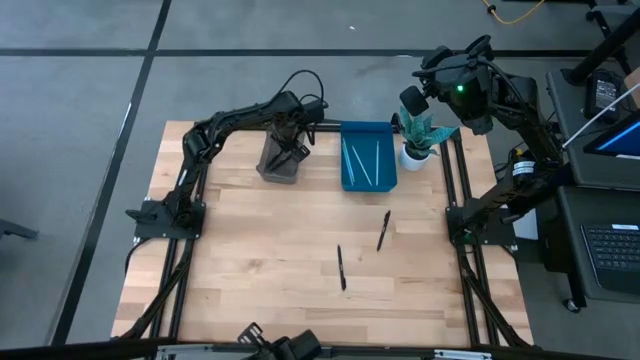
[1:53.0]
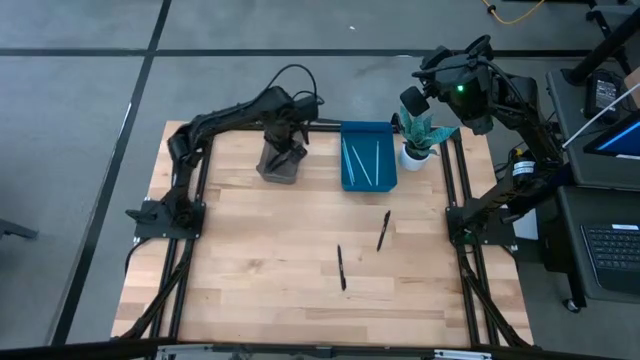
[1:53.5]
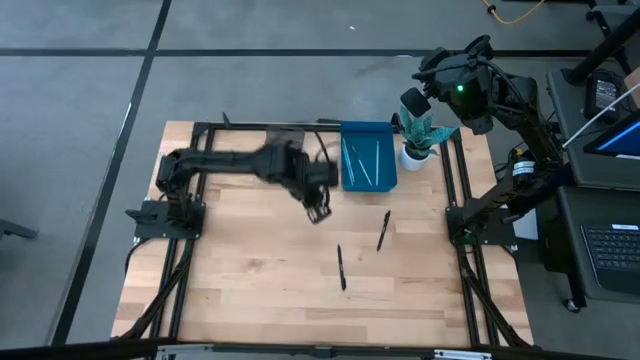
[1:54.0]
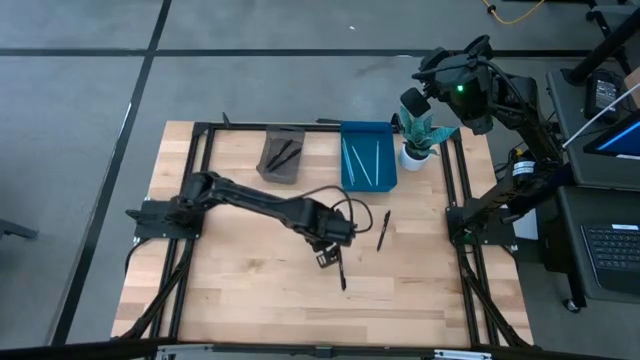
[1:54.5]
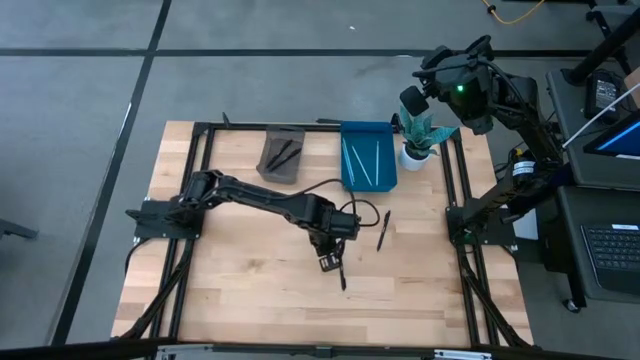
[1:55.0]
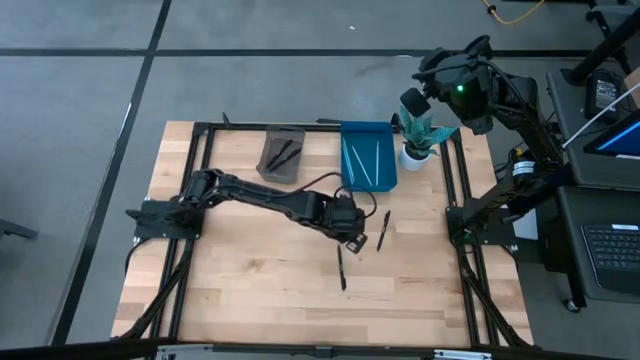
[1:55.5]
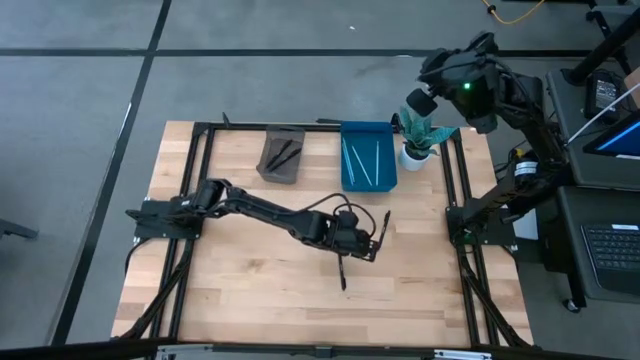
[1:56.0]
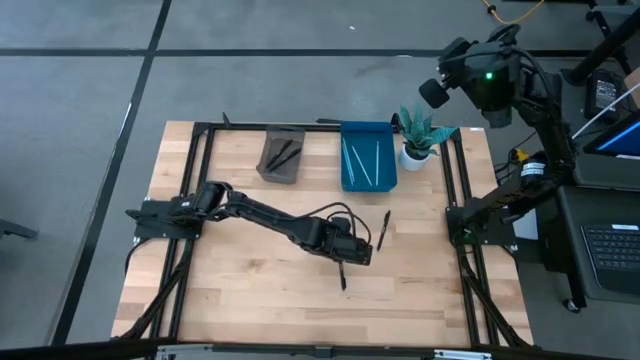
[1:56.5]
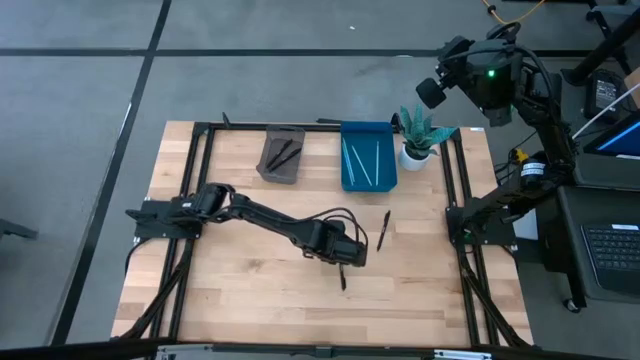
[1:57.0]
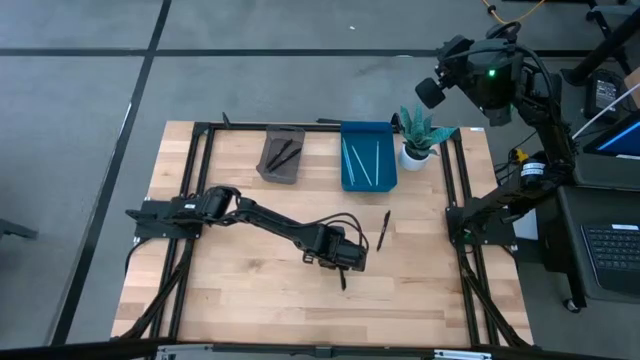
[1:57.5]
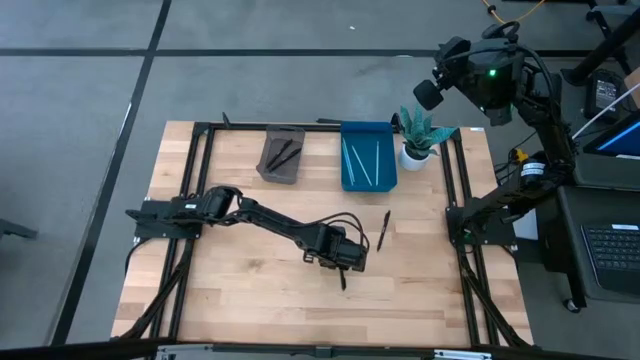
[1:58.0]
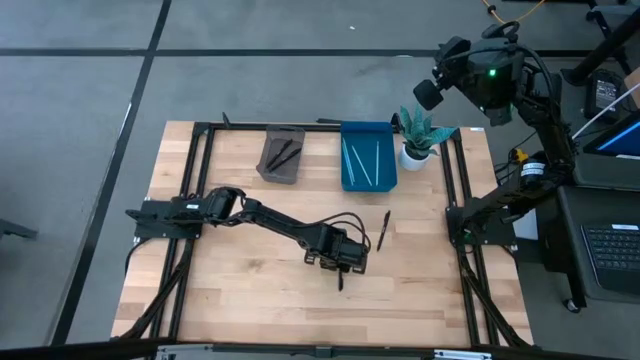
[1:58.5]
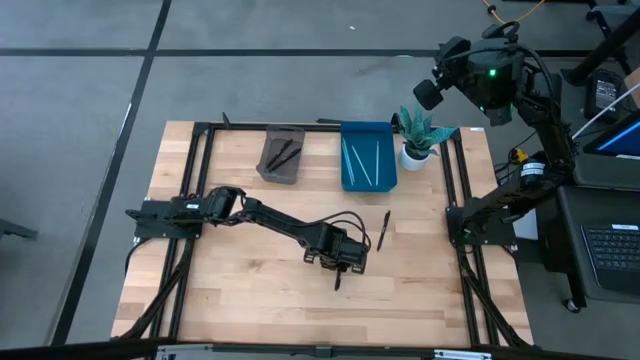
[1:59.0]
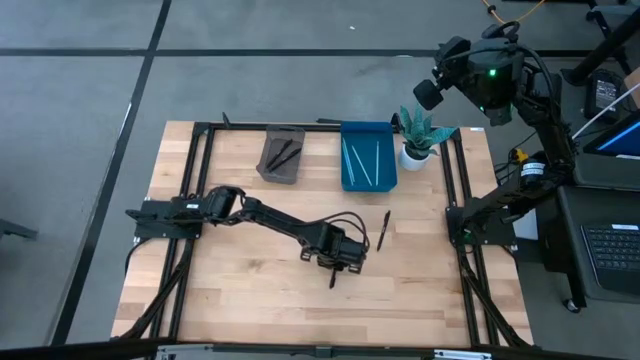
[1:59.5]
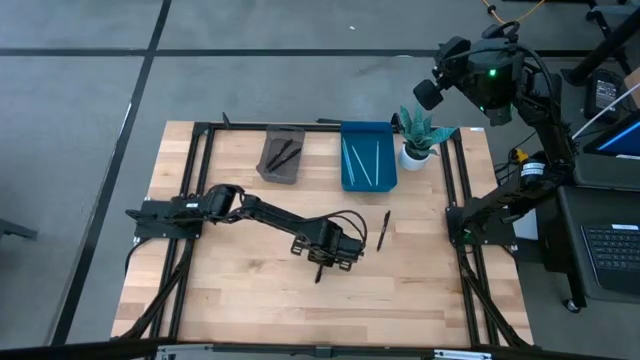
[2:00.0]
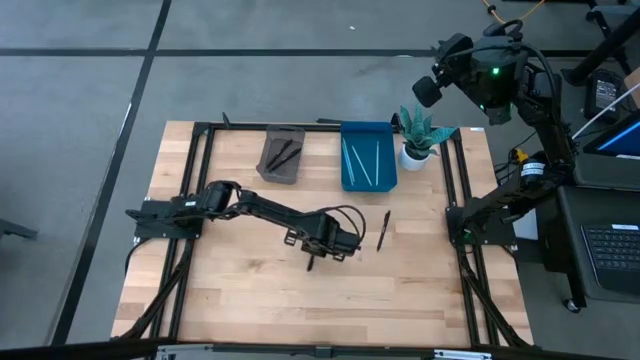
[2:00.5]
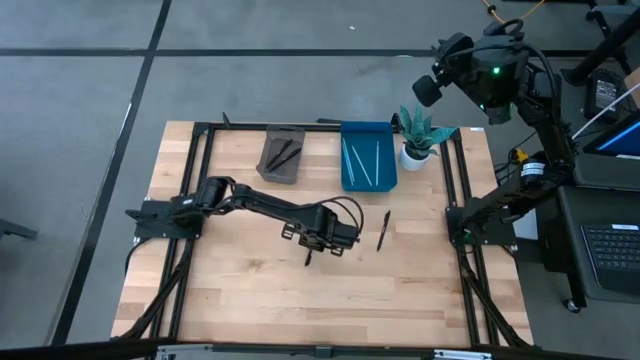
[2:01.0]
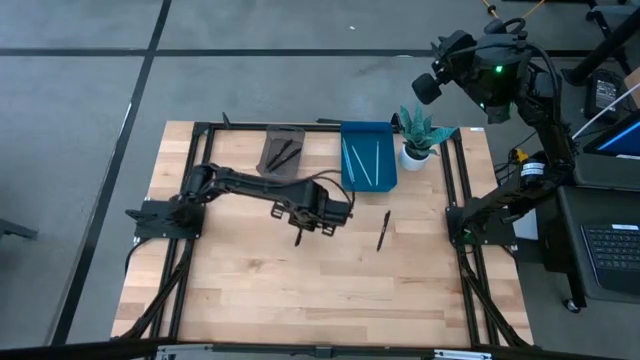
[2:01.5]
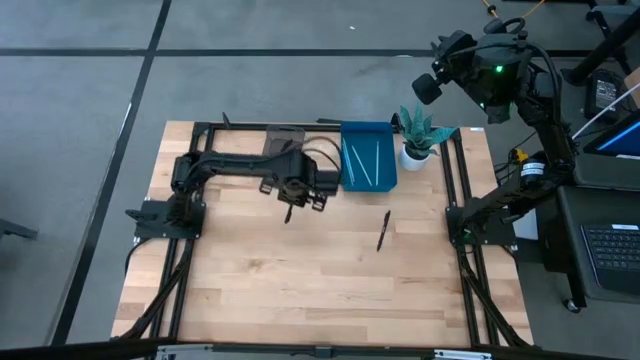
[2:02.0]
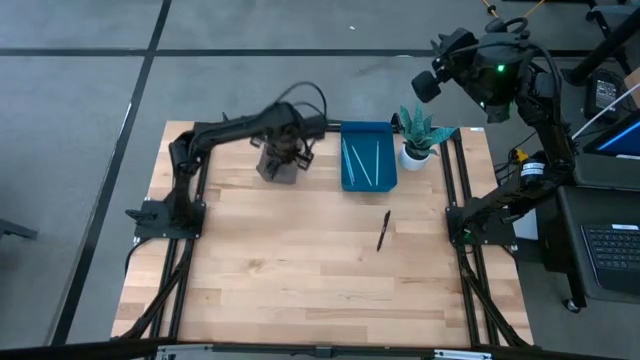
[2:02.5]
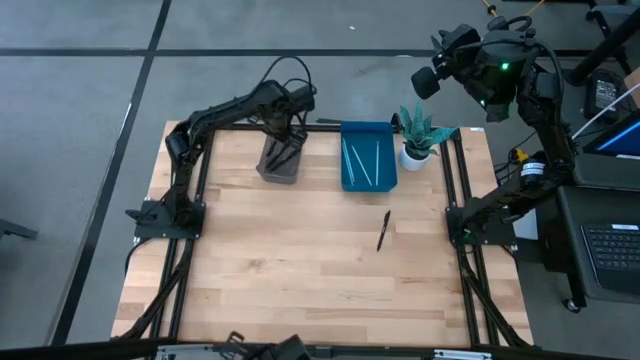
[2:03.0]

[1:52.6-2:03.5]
Task: Sort pens & pencils
Put the bottom black pen into the gray bin

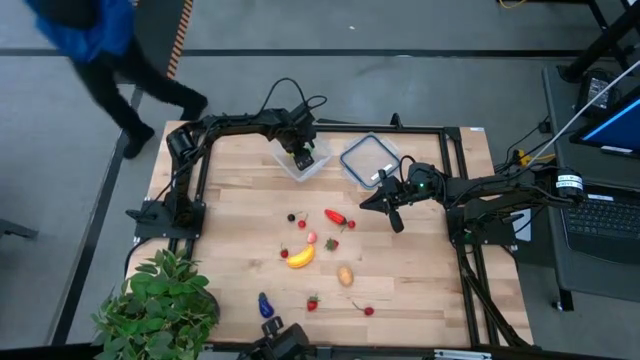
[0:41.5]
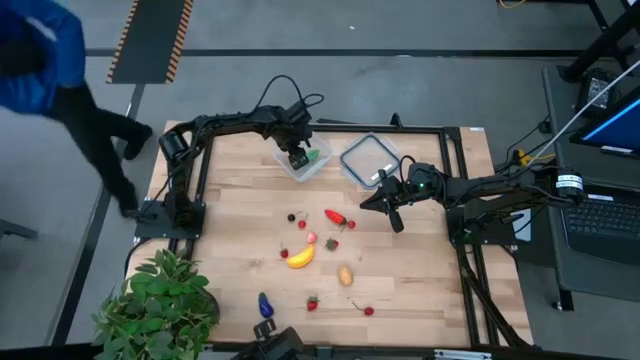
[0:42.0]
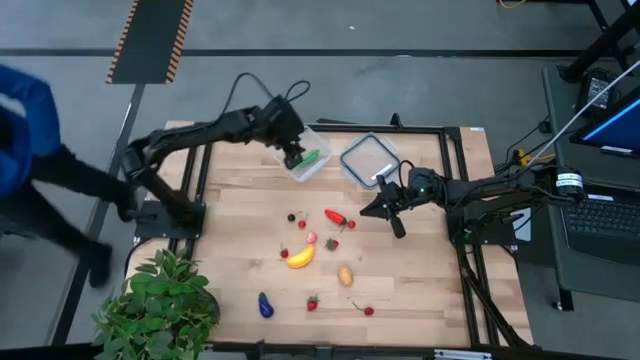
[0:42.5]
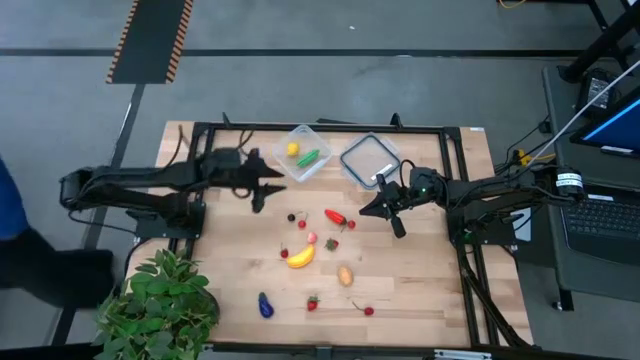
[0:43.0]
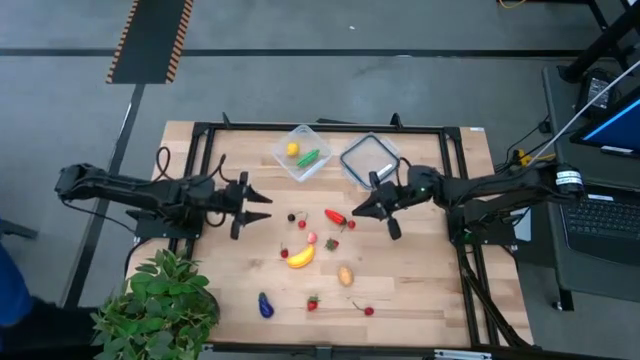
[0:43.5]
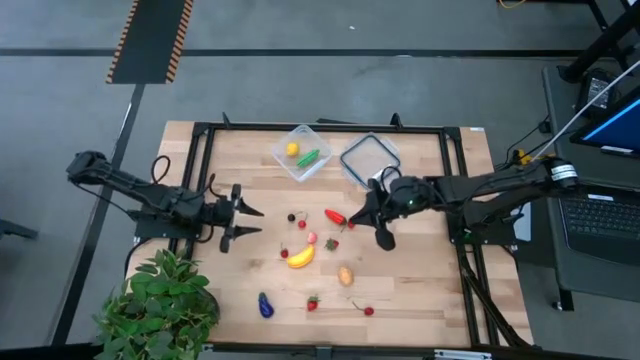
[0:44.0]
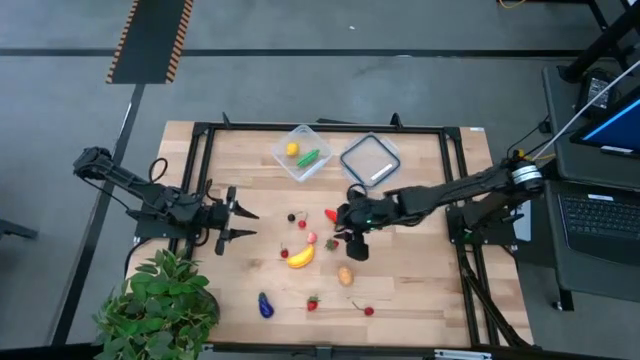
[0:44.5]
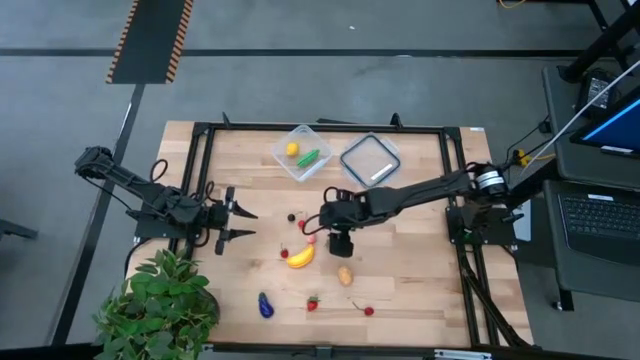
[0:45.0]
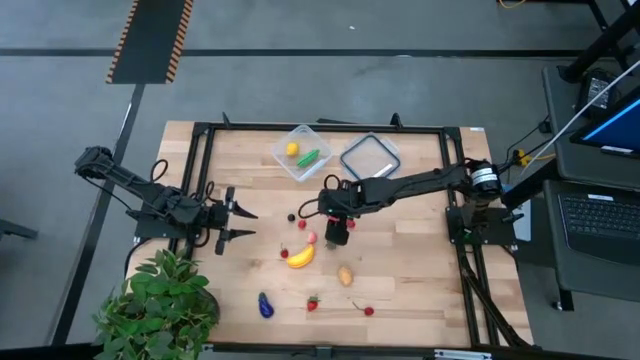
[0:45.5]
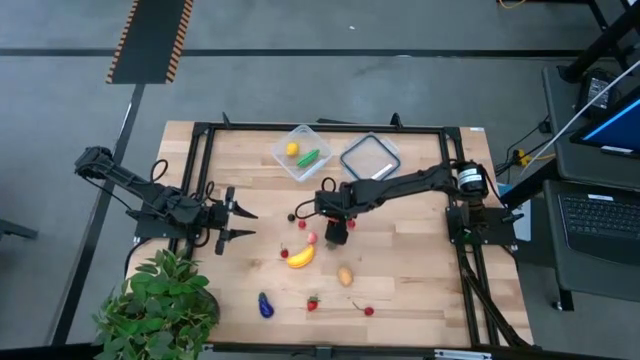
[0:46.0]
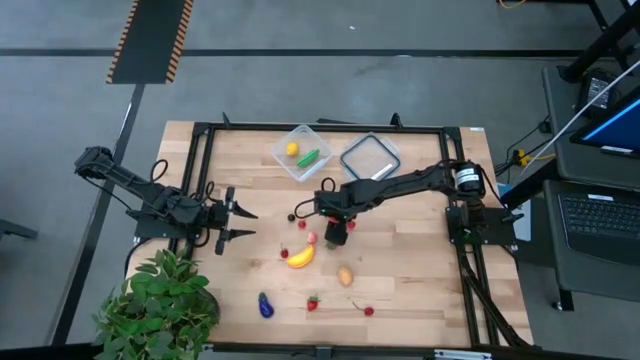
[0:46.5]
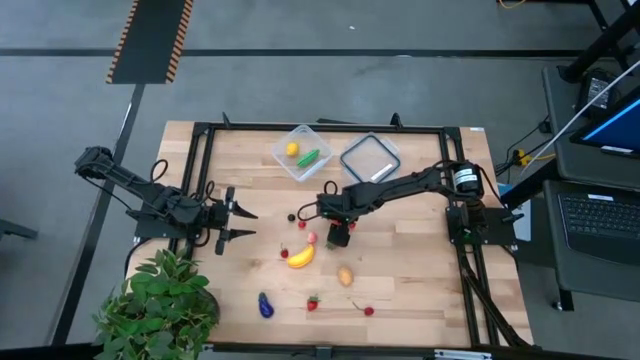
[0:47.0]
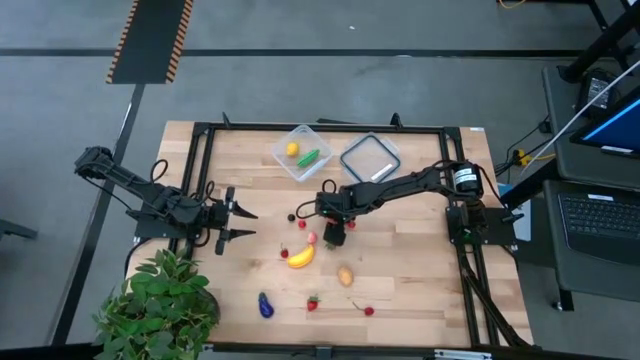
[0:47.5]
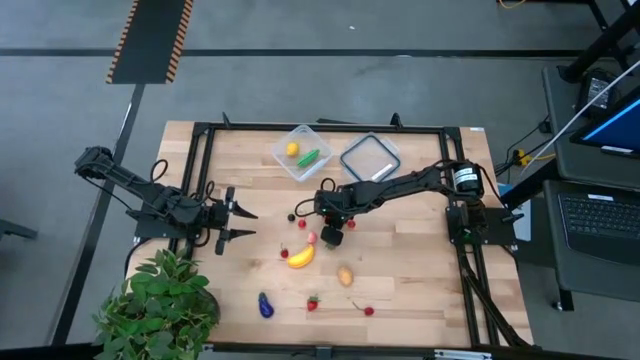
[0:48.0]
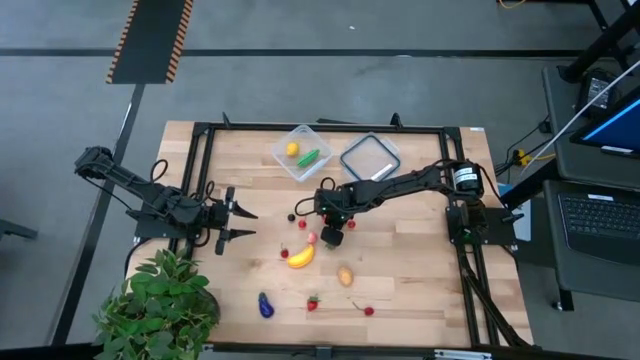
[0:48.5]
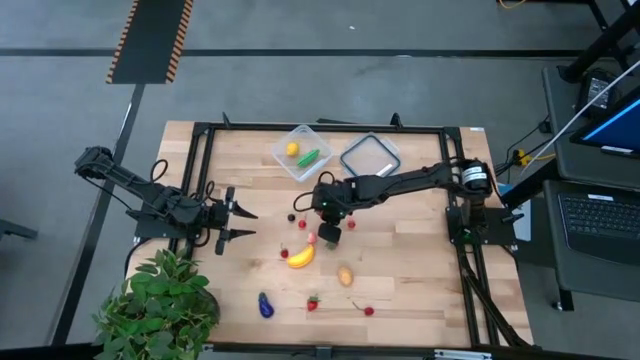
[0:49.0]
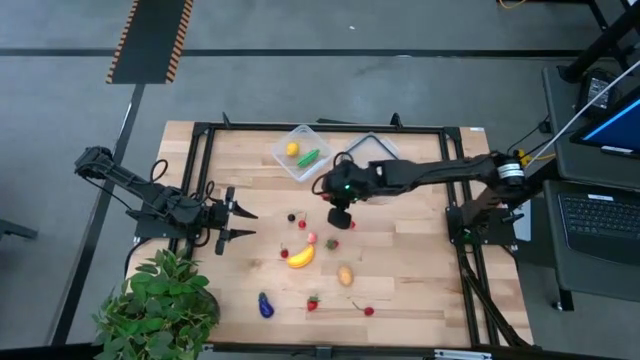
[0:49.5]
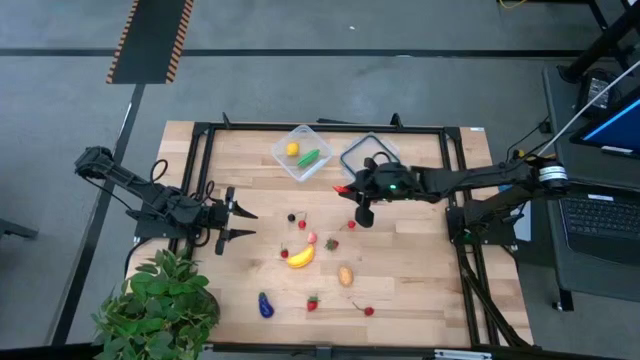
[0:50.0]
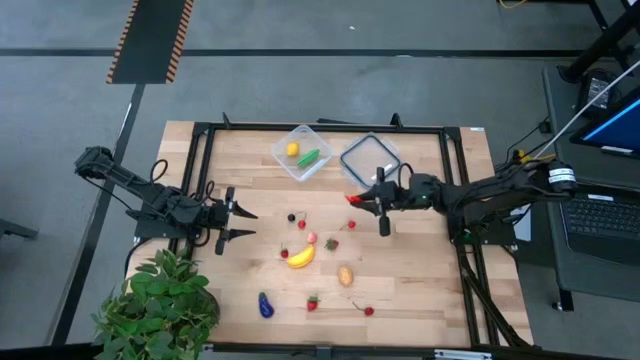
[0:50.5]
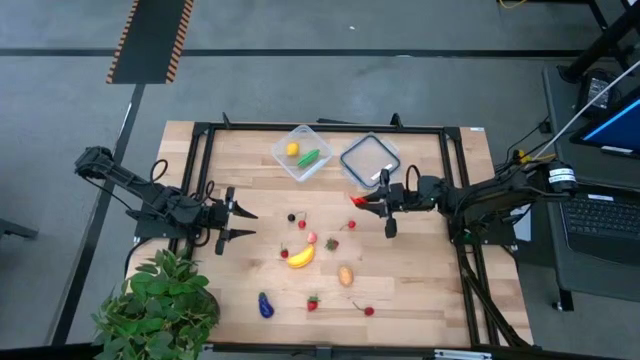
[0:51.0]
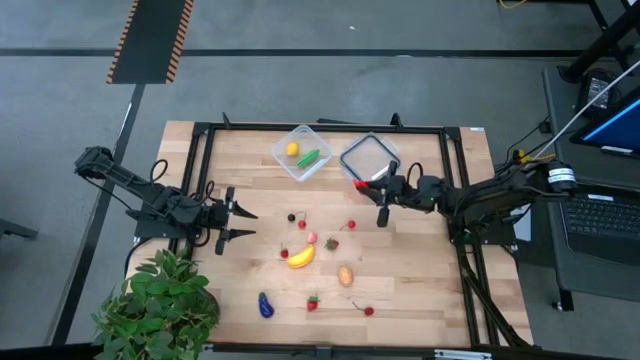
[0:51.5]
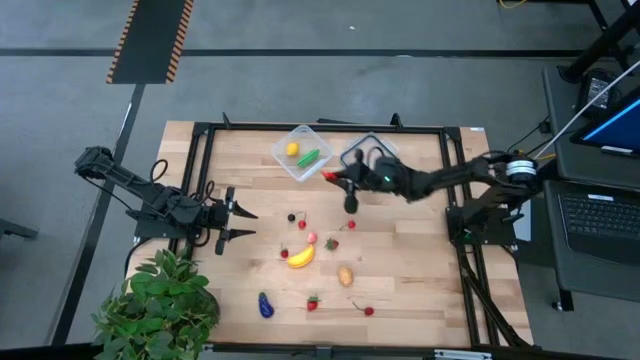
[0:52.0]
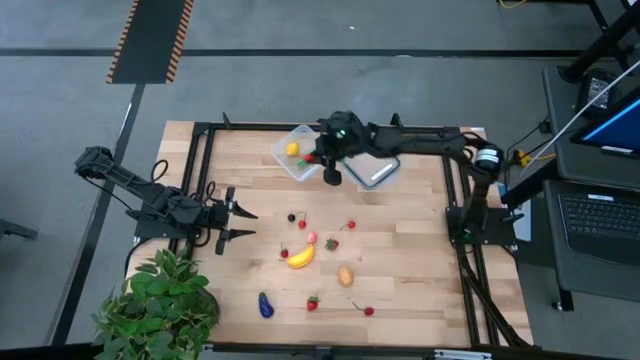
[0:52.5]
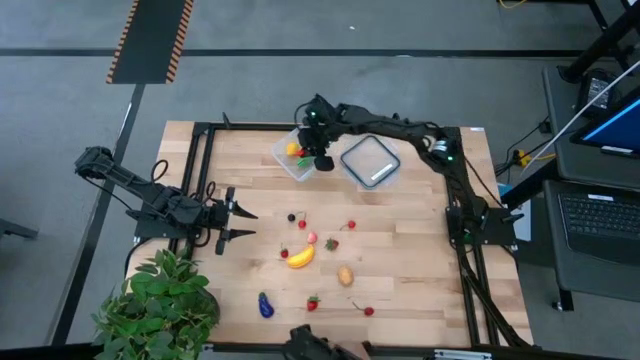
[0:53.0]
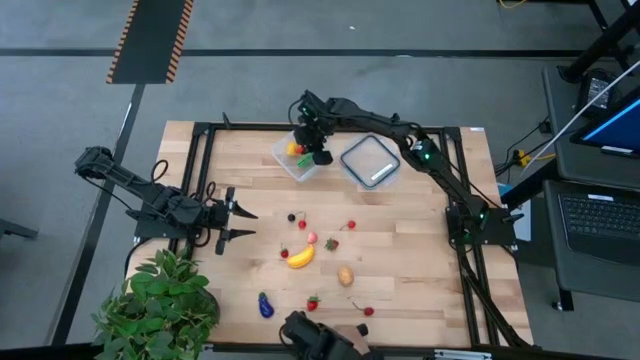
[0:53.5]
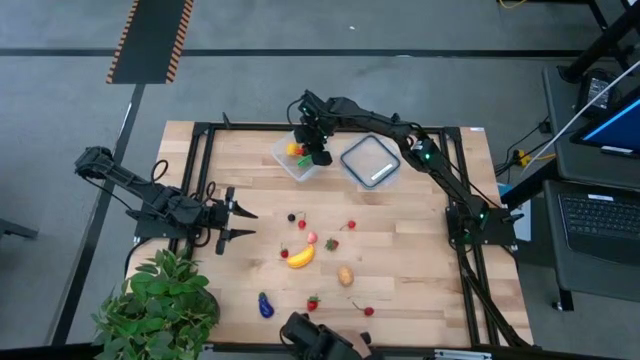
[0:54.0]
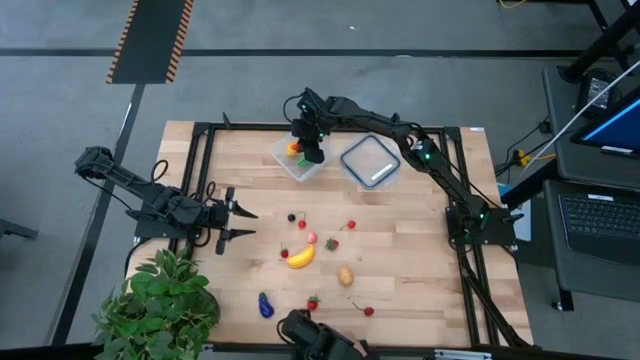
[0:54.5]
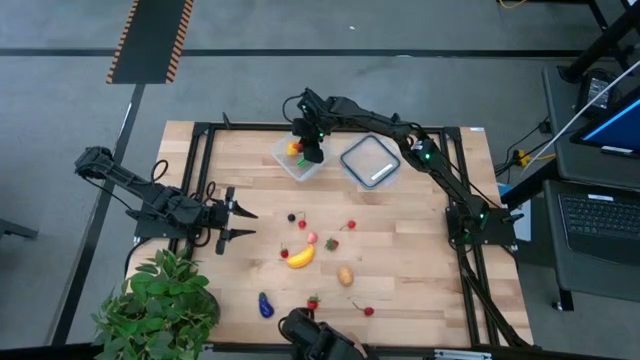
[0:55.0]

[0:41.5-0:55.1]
Task: Pick and placing Produce into tupperware
Put the red chili pepper into the transparent container
